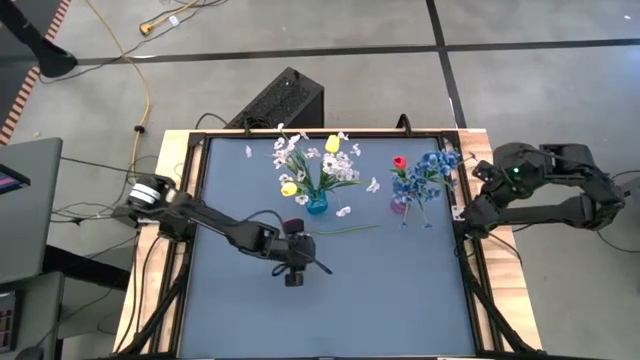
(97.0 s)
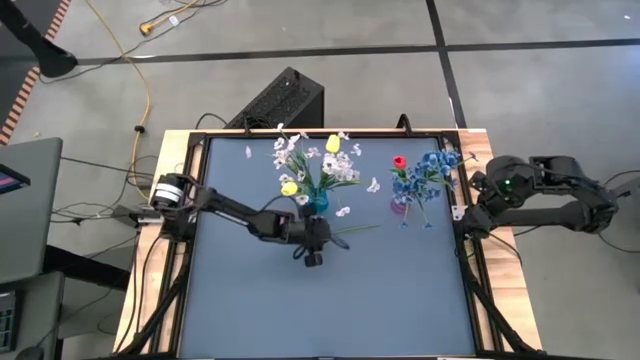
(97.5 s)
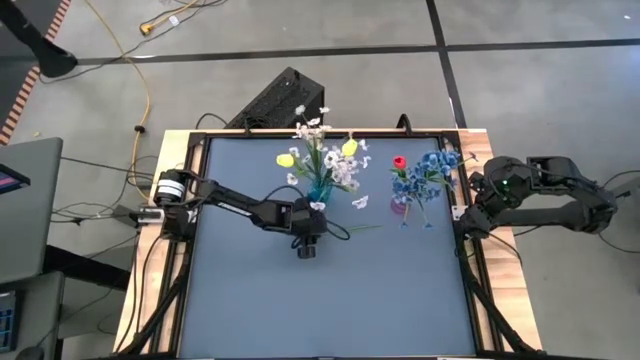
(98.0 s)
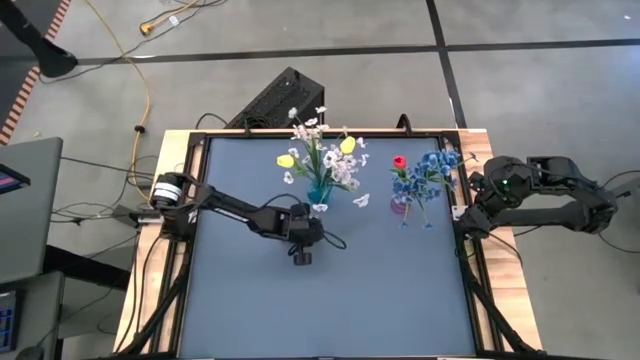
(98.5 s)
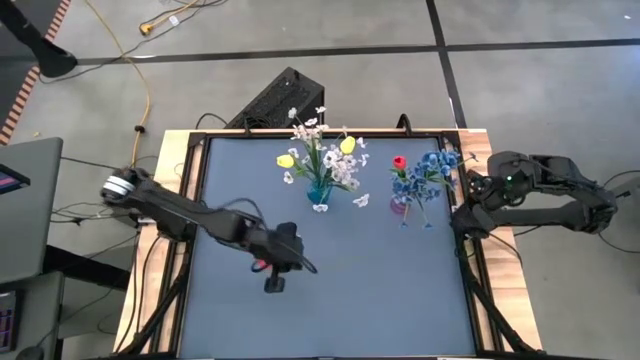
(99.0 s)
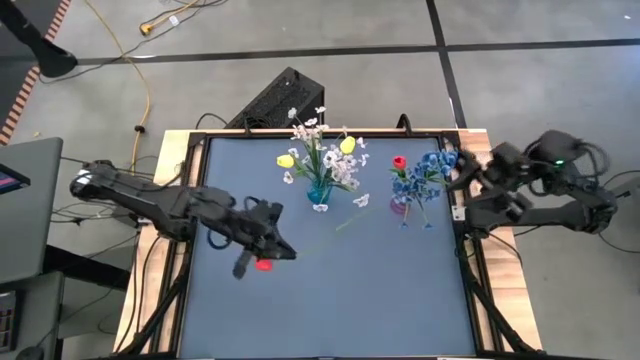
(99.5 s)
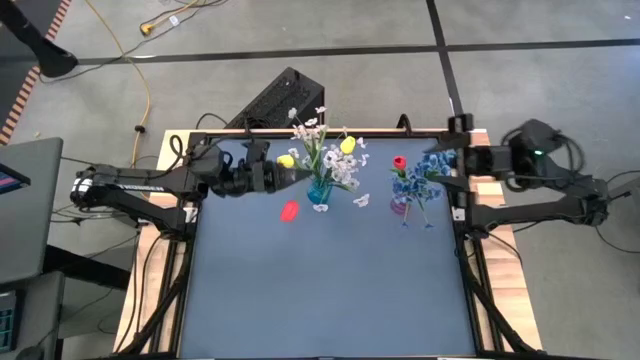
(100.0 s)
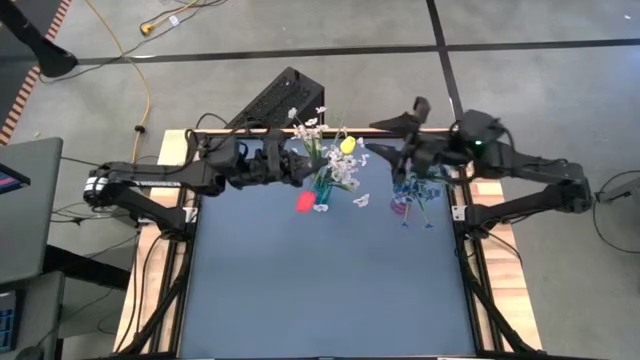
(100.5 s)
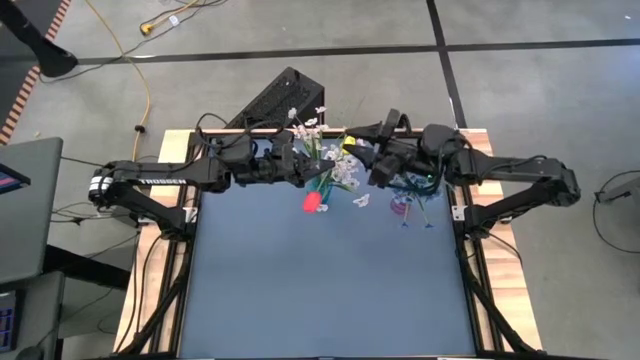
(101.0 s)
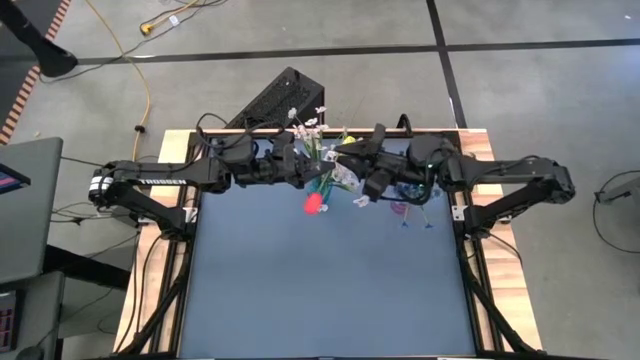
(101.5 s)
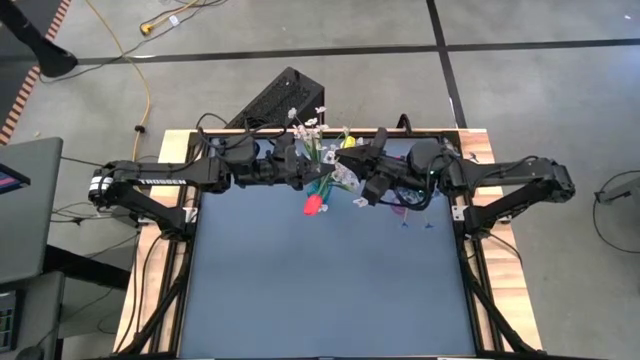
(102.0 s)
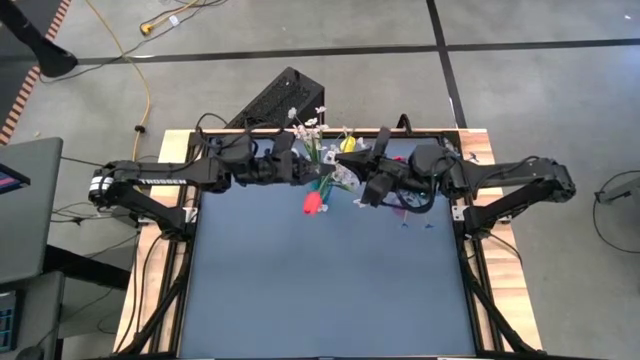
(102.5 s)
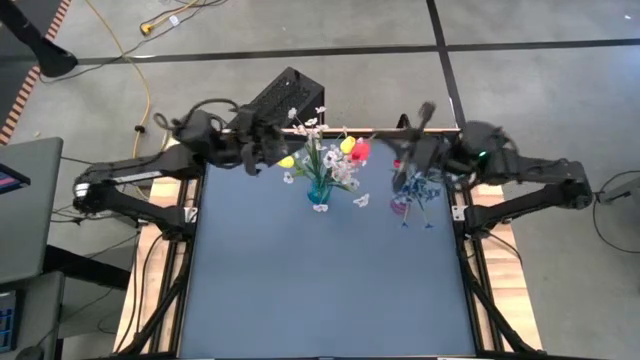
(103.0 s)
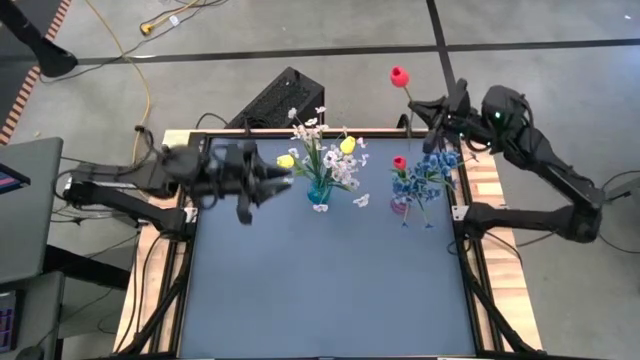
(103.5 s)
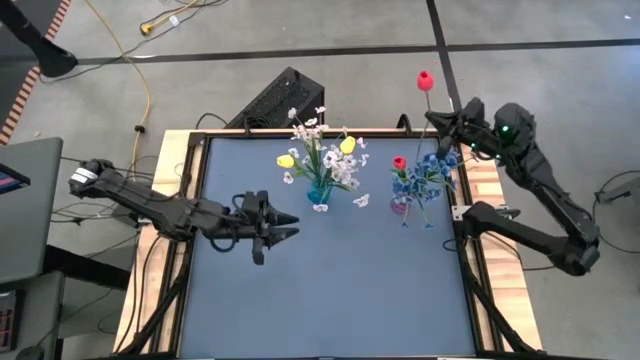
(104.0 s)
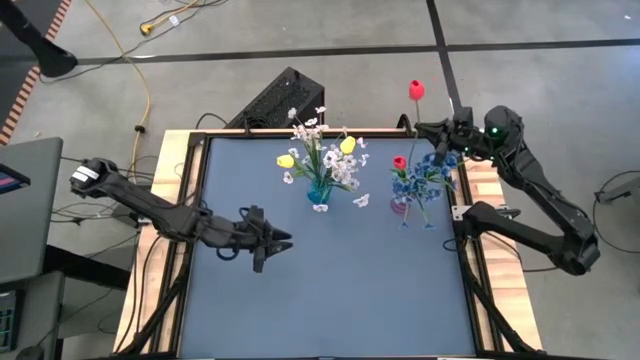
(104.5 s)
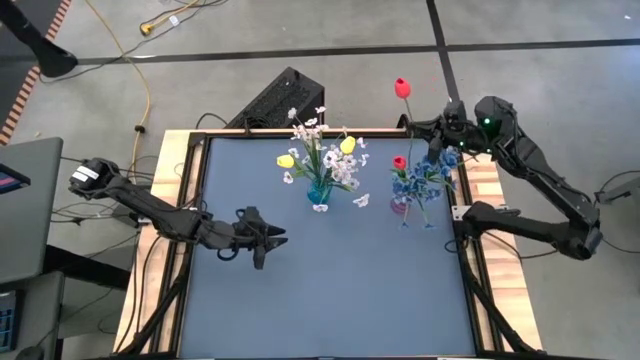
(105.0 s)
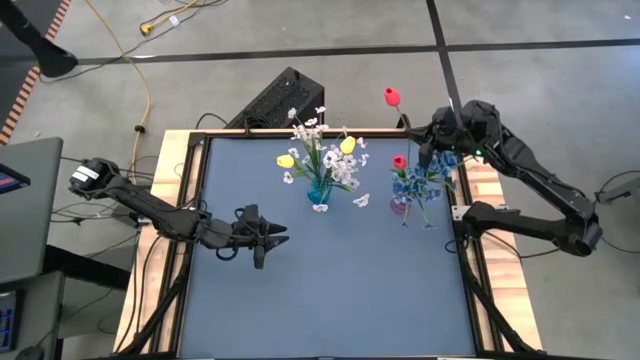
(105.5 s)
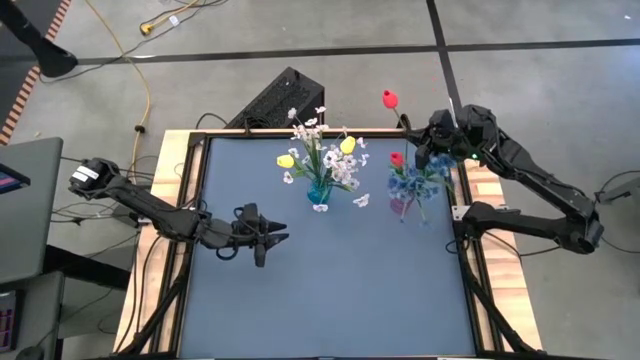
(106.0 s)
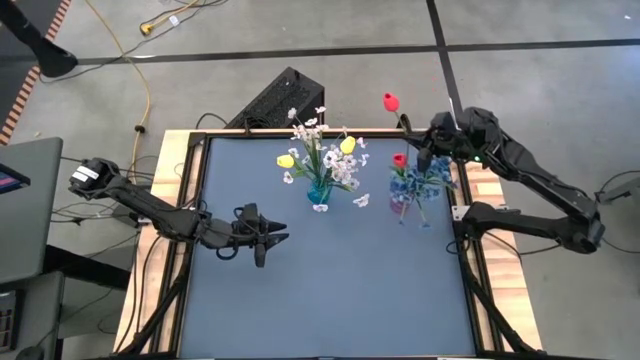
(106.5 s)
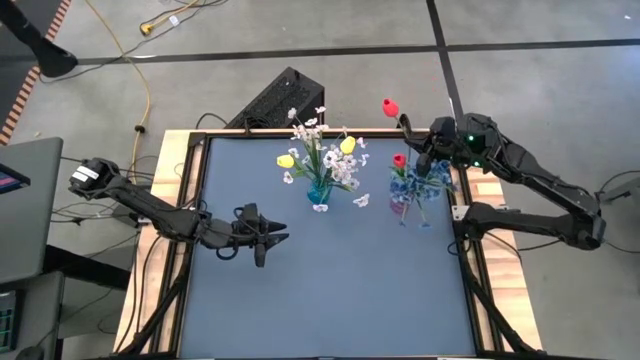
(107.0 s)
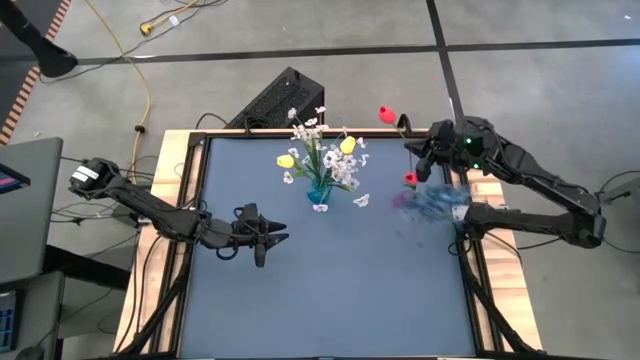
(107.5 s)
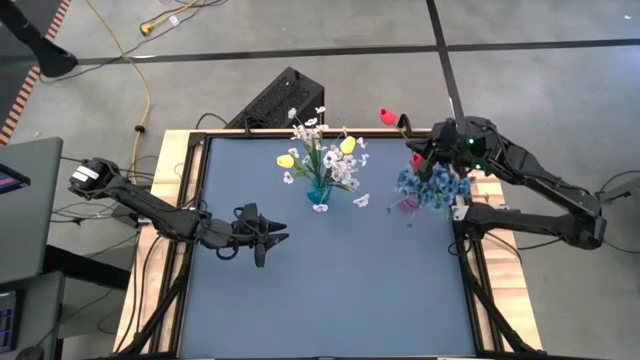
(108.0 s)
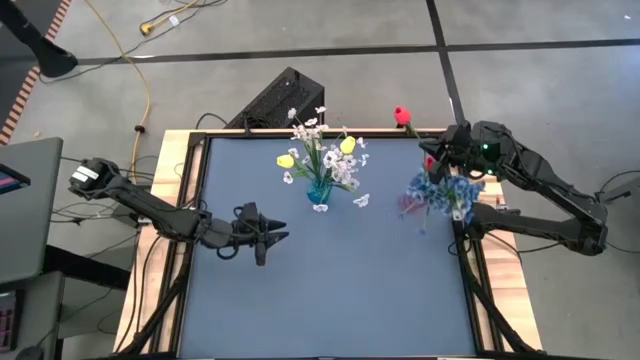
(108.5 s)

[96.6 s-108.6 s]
Task: Sort flowers into vase by color
Put the red flower into the violet vase

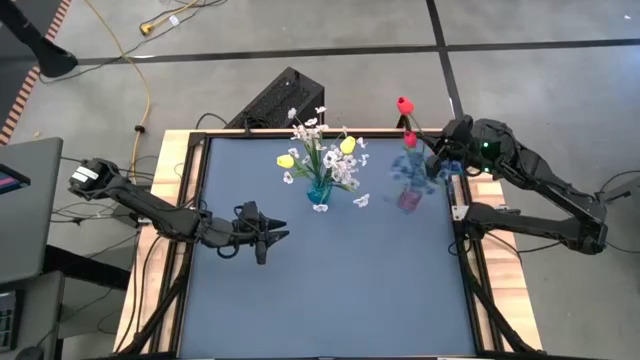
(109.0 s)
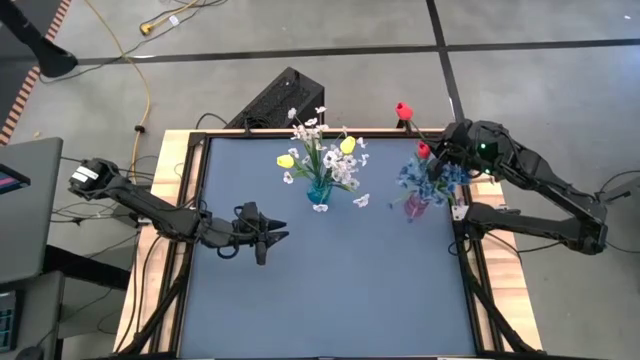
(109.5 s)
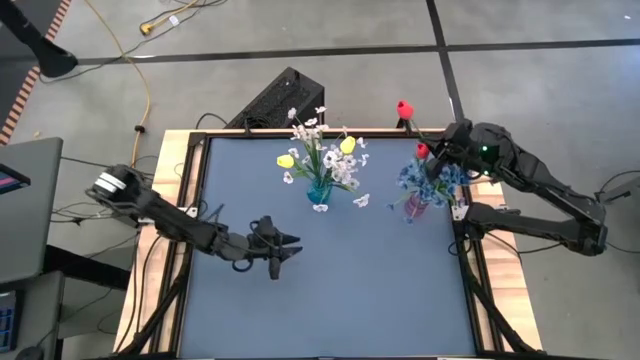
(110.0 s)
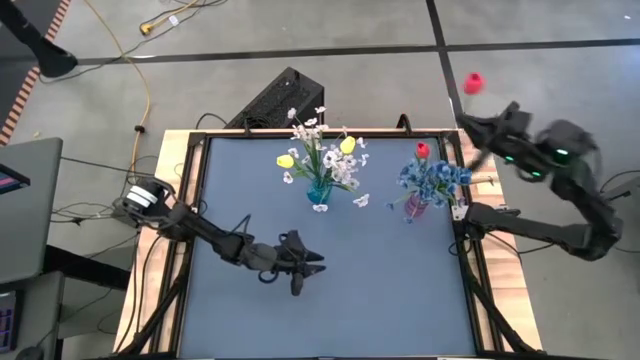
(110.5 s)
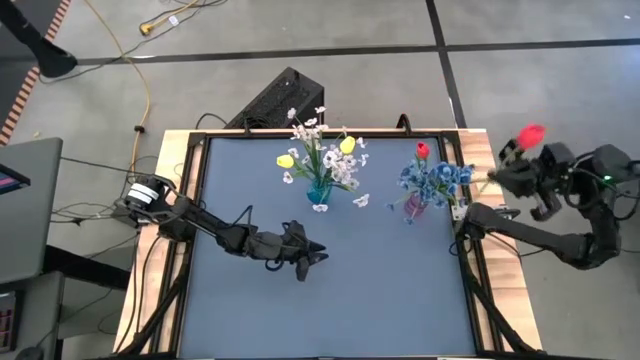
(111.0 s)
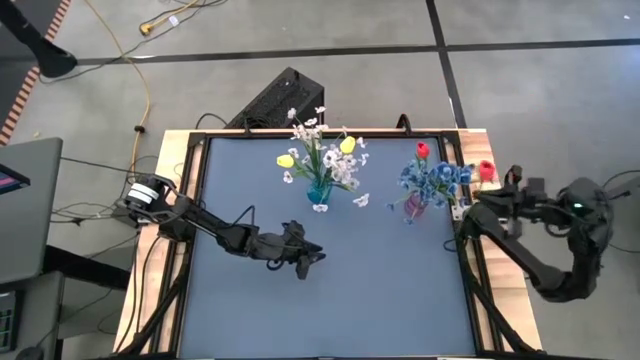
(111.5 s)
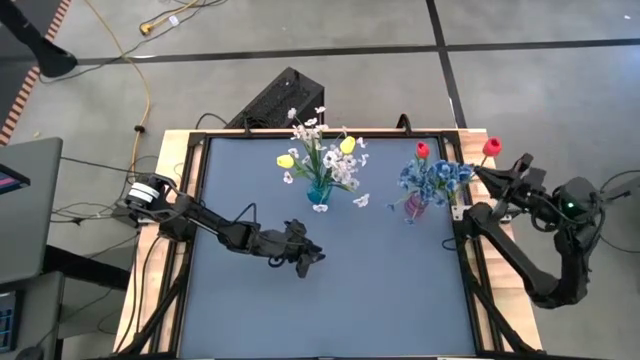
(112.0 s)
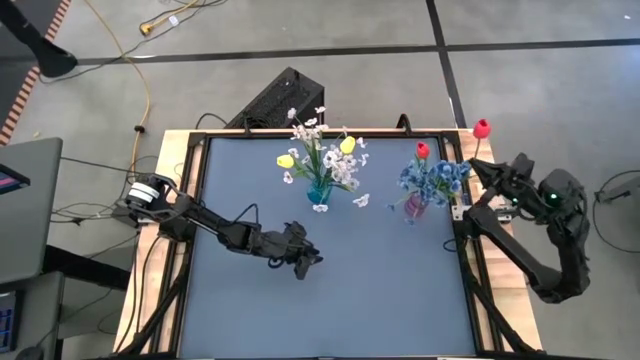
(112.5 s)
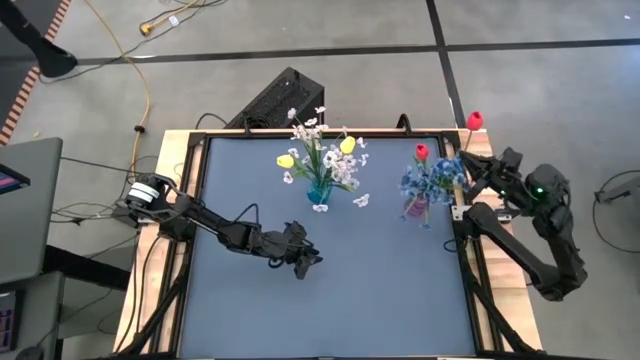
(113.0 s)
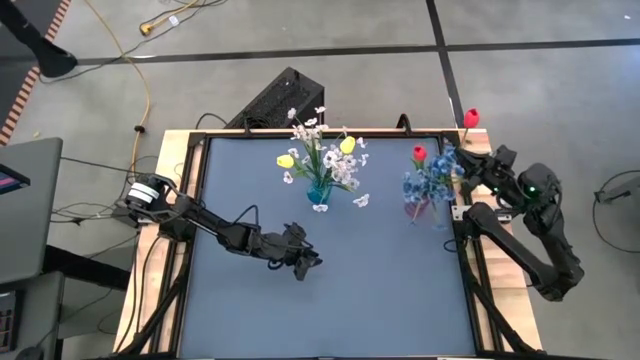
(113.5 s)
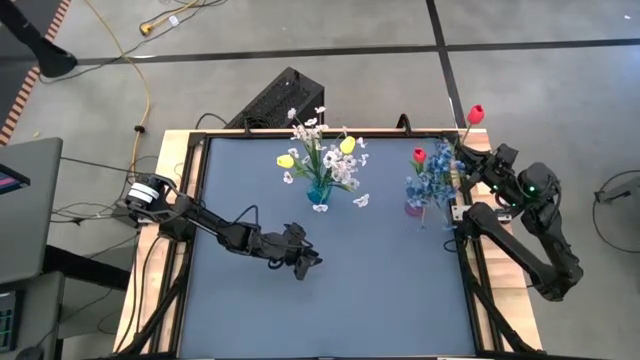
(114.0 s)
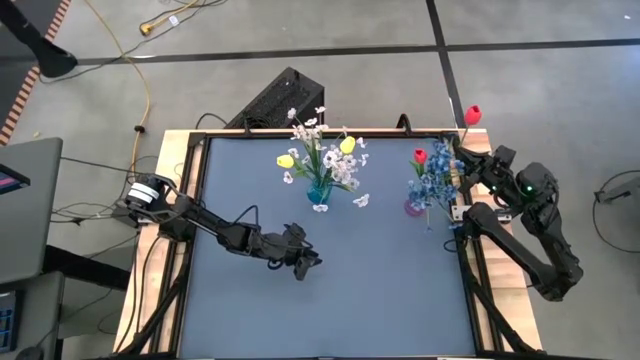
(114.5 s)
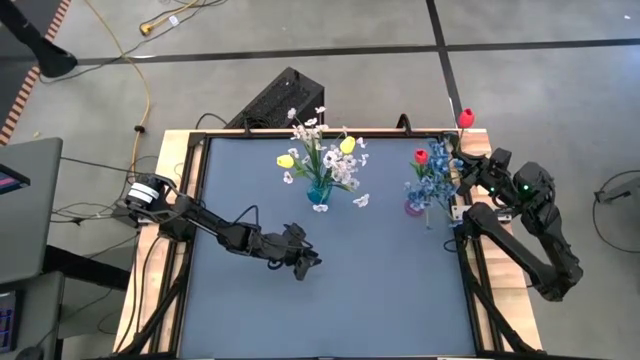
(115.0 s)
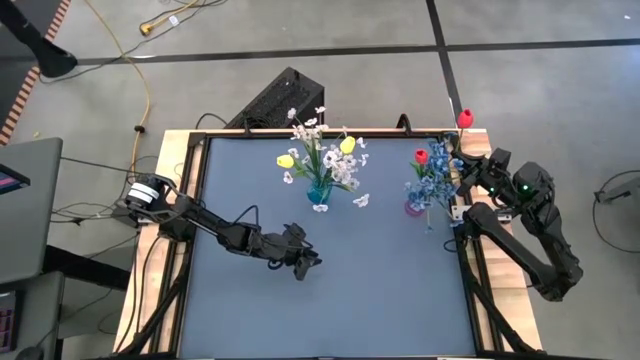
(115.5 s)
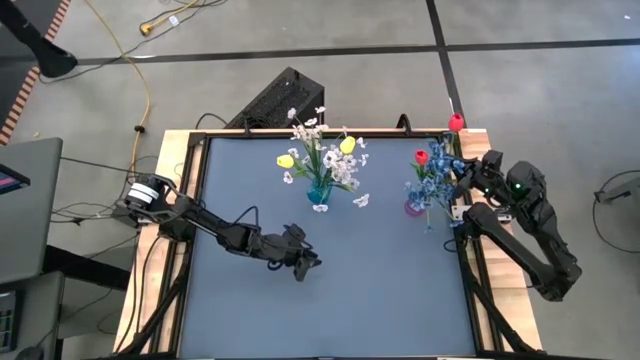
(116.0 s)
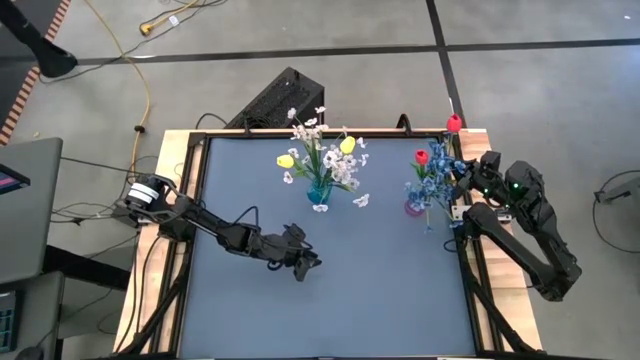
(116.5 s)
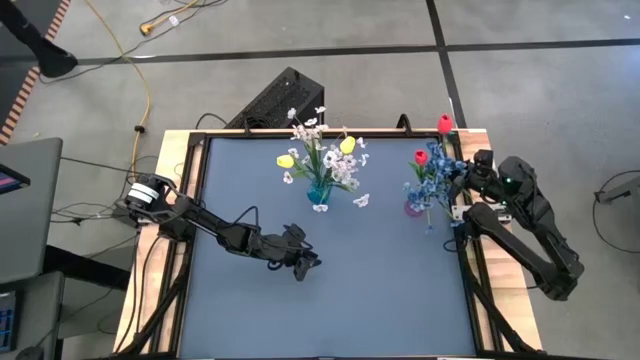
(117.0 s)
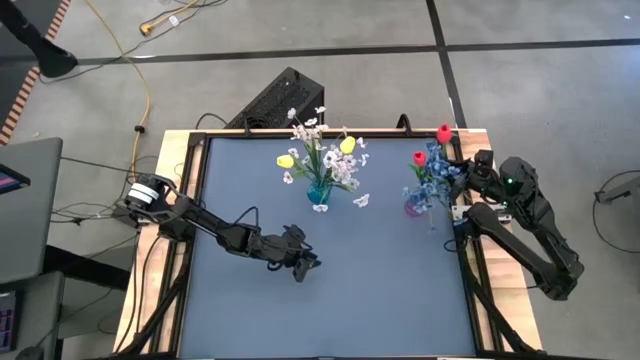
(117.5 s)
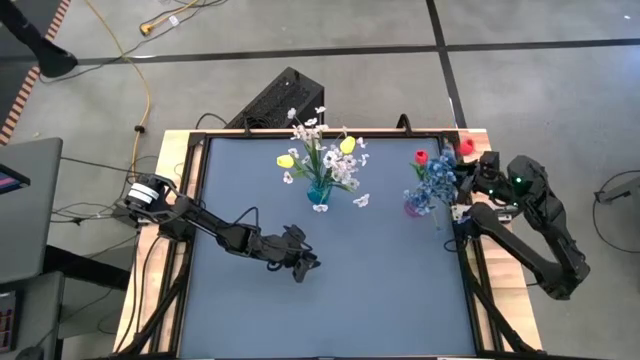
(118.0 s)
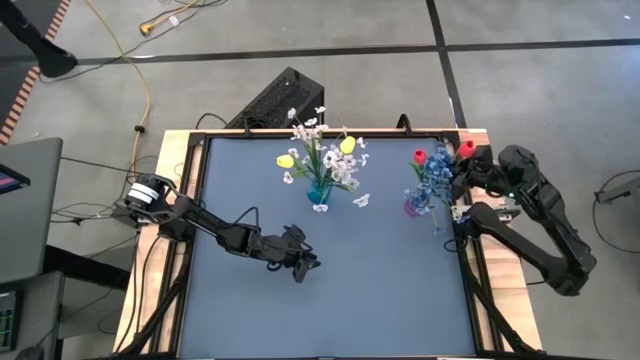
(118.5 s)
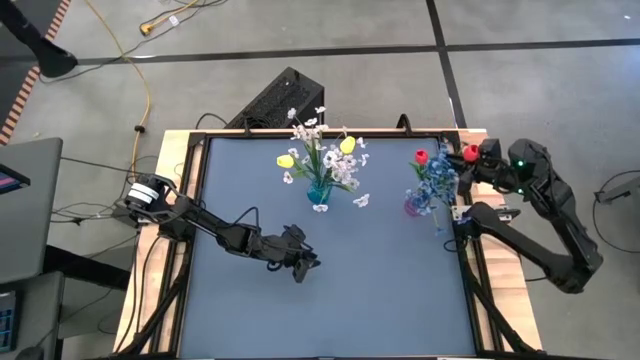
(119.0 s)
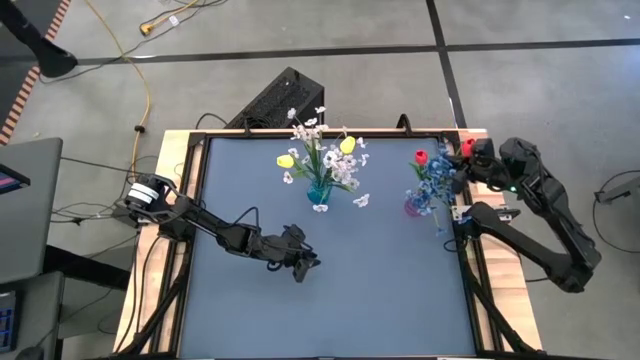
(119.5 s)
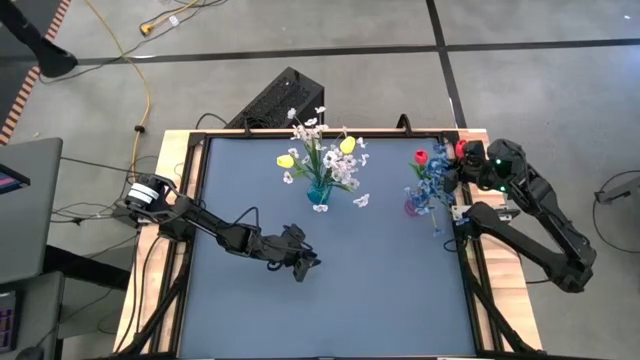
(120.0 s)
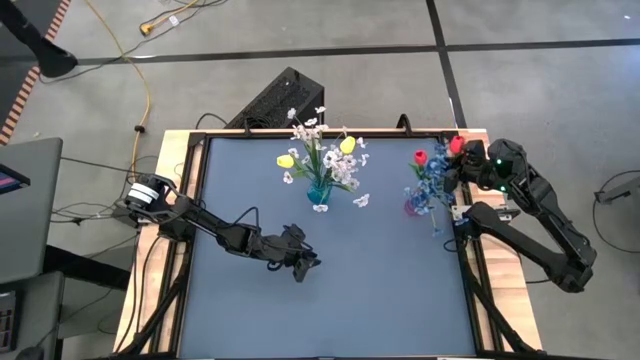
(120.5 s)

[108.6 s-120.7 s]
Put the red flower into the violet vase
